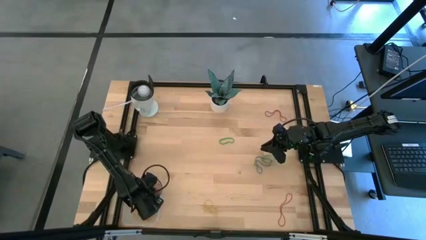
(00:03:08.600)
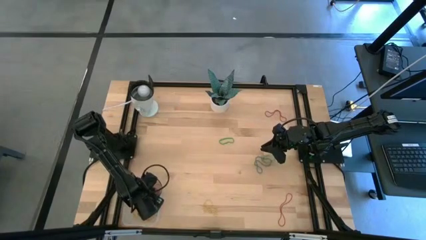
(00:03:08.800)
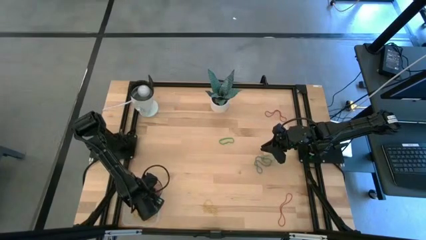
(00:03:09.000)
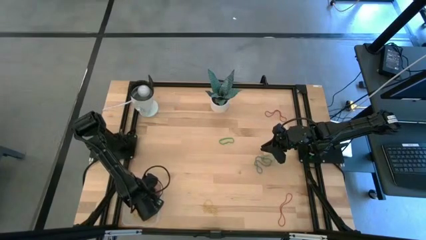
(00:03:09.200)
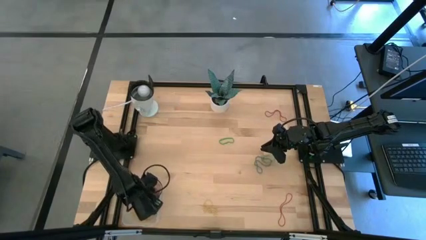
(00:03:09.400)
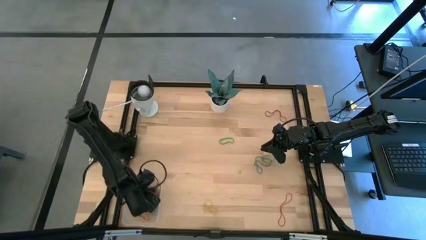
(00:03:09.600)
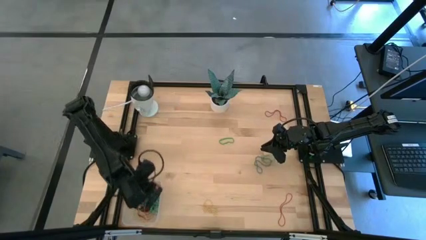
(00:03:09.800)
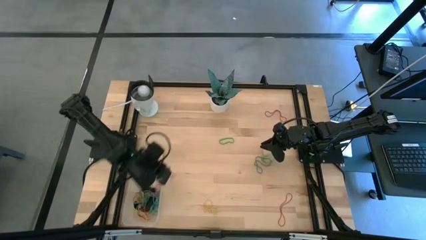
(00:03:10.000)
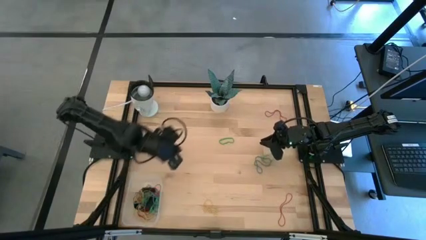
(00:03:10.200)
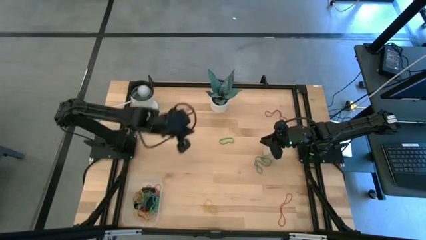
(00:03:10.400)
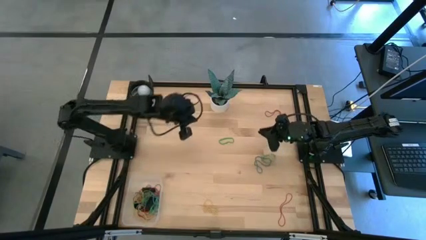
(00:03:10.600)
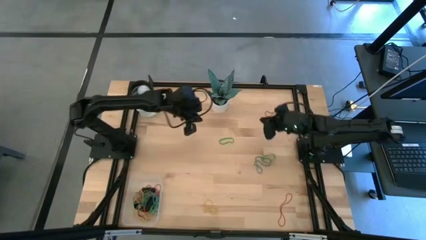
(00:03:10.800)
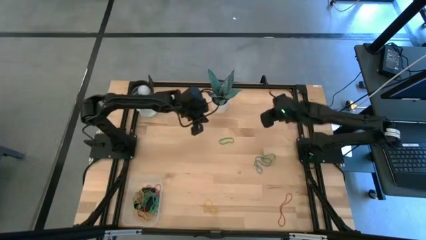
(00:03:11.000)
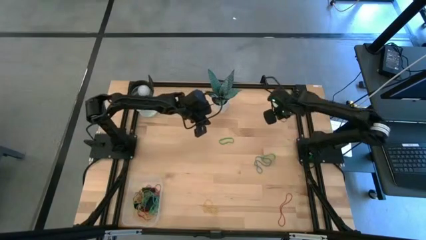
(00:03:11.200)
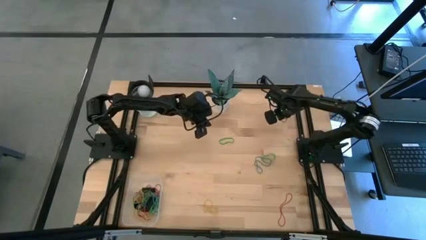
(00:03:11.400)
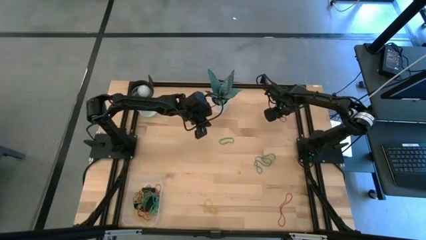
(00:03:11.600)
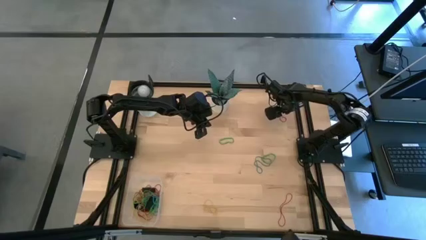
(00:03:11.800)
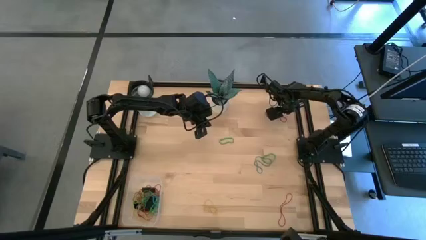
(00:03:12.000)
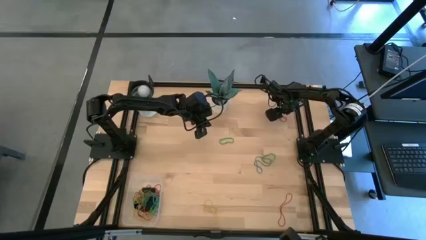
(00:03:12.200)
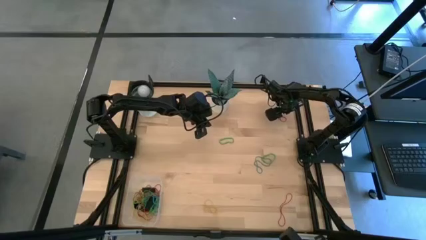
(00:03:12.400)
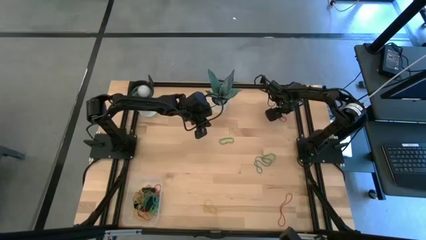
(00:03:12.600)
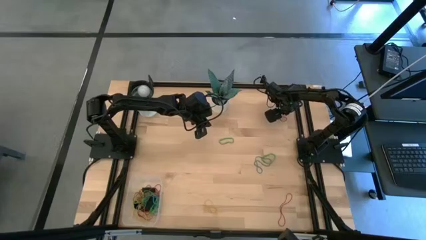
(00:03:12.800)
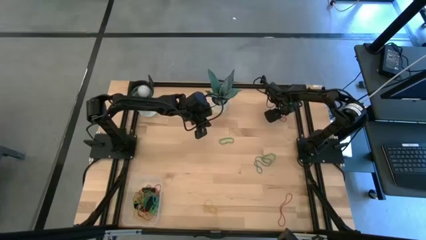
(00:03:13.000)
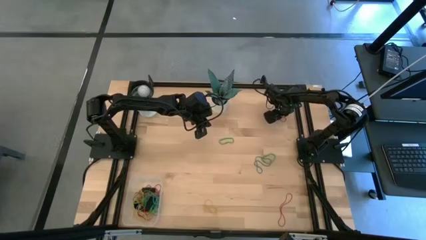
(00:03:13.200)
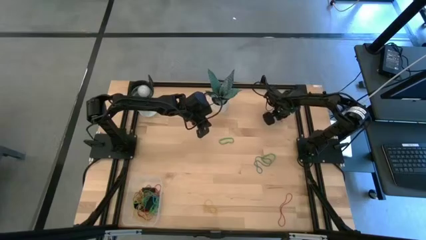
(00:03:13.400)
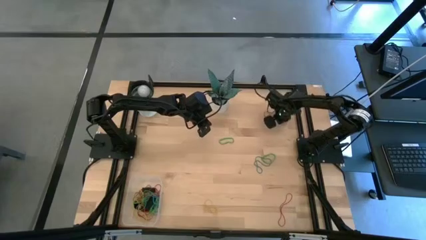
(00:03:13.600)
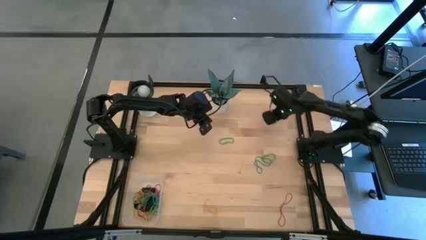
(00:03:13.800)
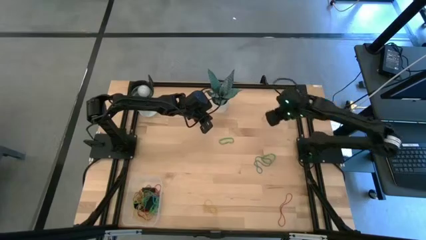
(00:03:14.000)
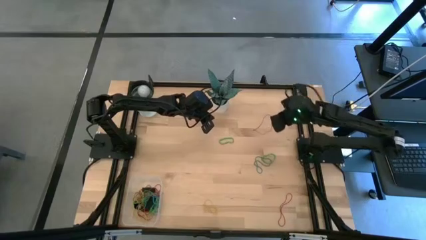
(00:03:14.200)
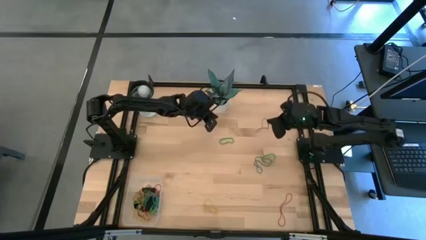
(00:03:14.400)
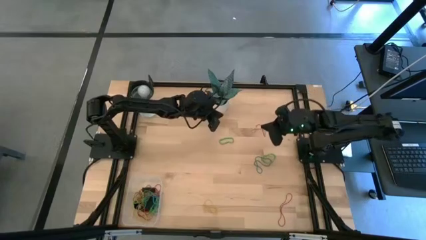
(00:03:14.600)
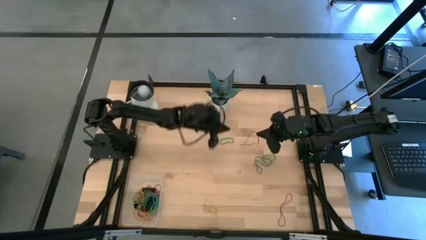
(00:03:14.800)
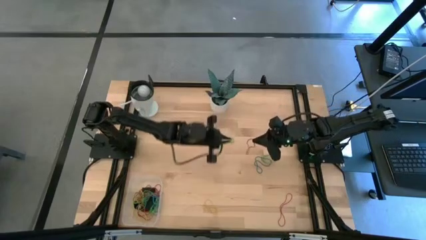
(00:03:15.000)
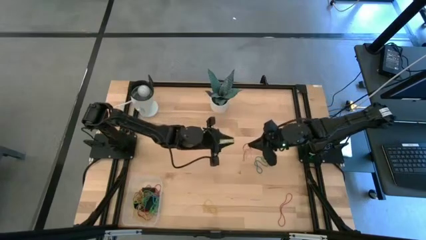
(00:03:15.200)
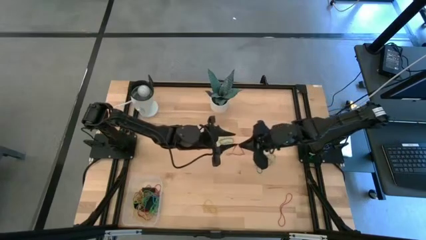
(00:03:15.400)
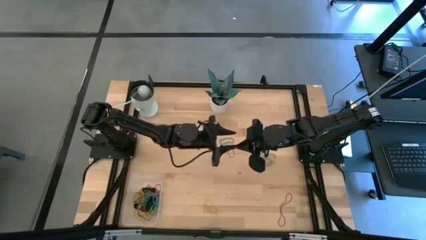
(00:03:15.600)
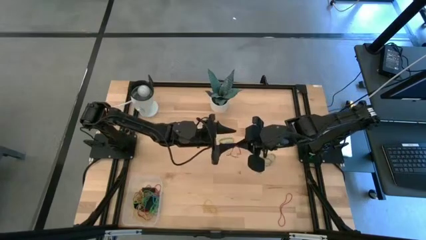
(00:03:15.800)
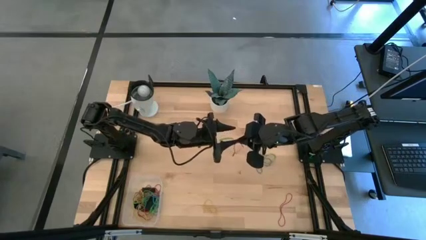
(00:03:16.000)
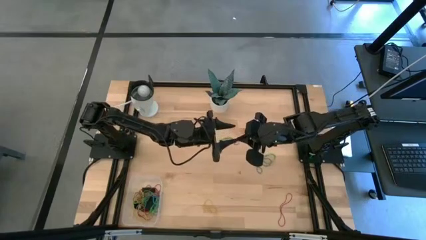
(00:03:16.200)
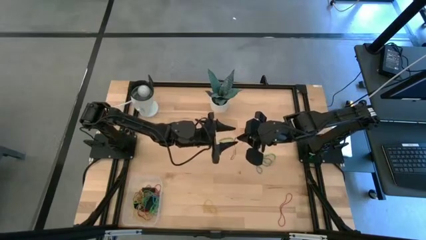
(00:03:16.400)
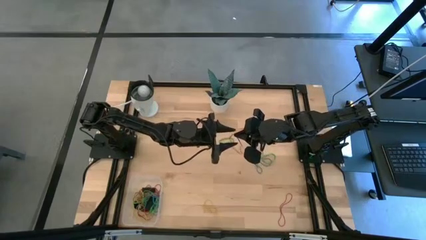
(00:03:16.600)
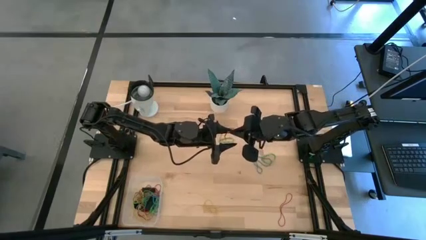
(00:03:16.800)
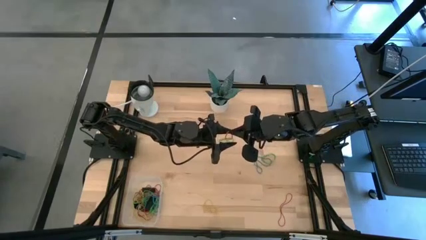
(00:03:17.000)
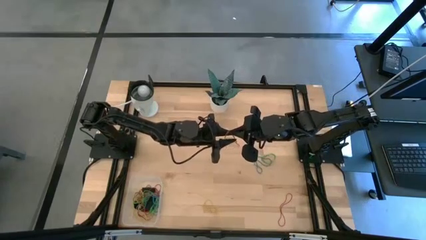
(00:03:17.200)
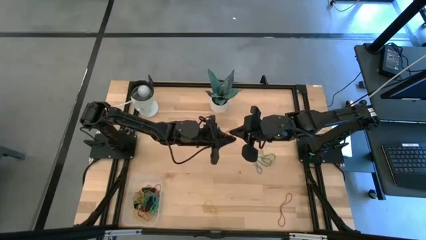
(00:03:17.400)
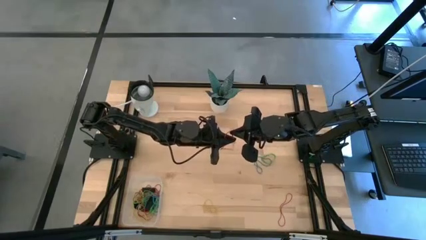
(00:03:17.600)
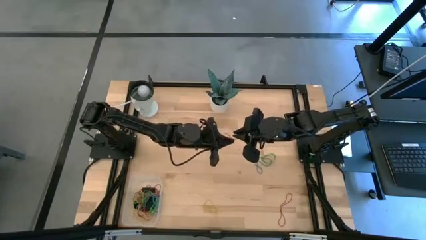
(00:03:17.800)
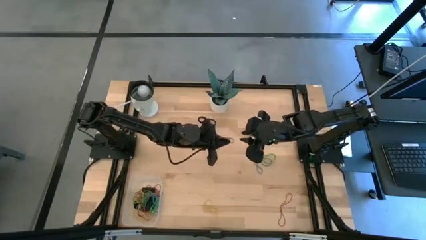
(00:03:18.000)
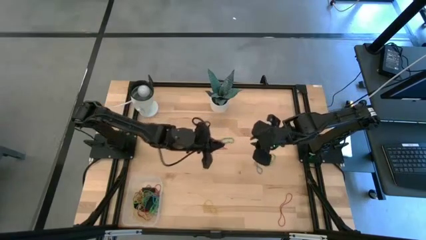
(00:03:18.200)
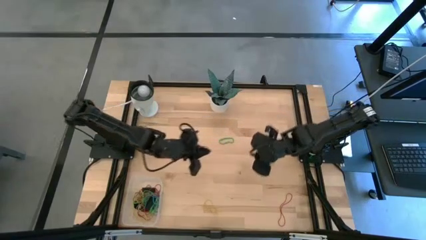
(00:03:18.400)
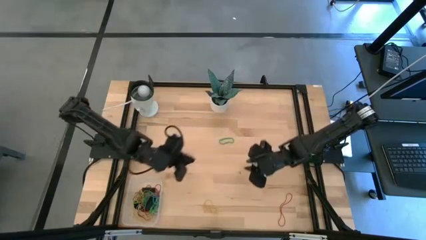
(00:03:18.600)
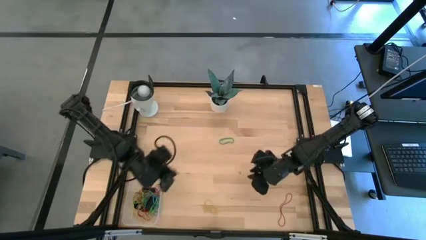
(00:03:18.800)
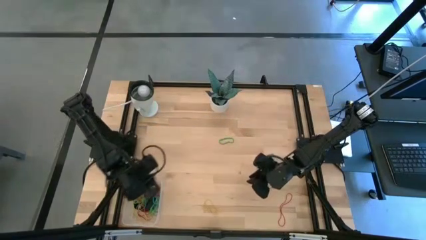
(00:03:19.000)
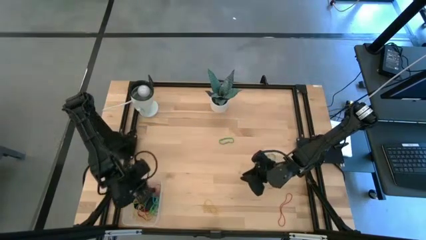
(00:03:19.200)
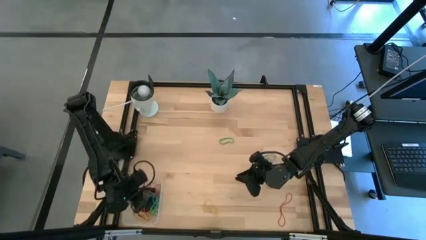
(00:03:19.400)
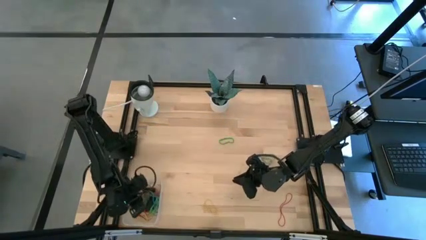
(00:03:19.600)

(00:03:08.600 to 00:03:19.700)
Task: Pick and place rubber bands into bin
Put the red rubber band into the transparent bin

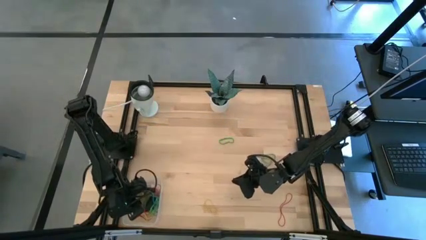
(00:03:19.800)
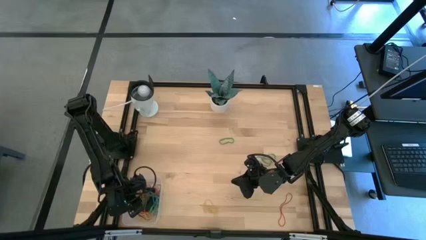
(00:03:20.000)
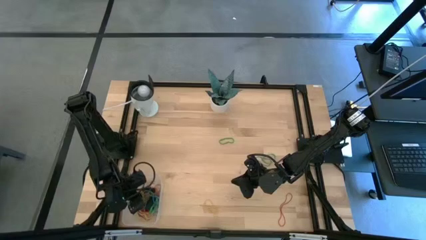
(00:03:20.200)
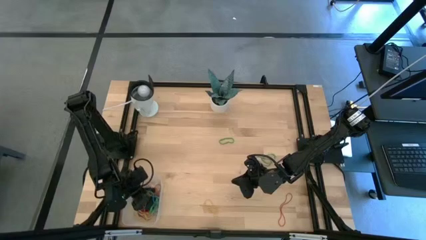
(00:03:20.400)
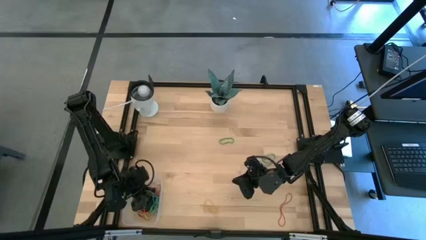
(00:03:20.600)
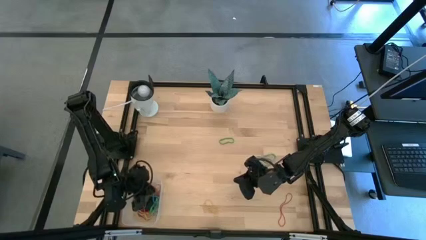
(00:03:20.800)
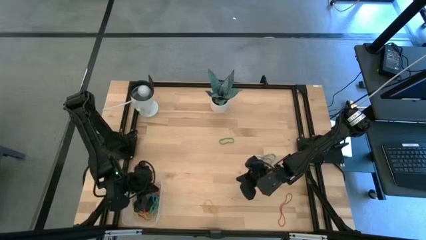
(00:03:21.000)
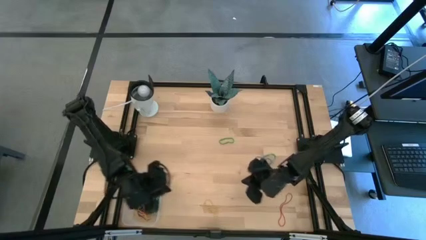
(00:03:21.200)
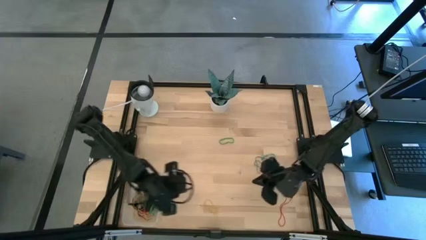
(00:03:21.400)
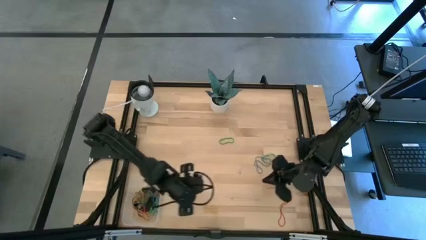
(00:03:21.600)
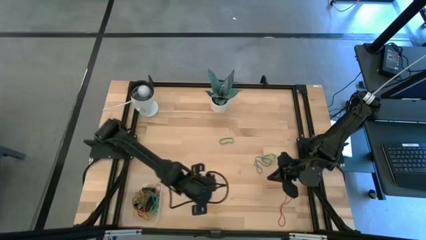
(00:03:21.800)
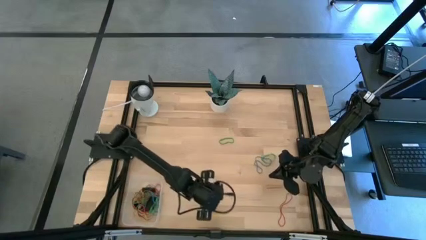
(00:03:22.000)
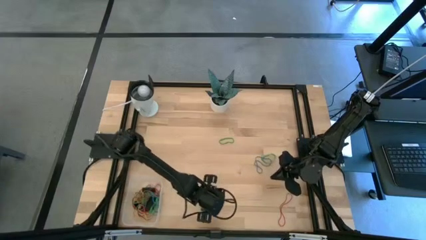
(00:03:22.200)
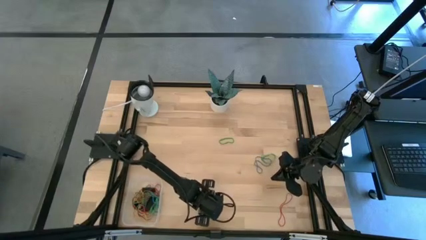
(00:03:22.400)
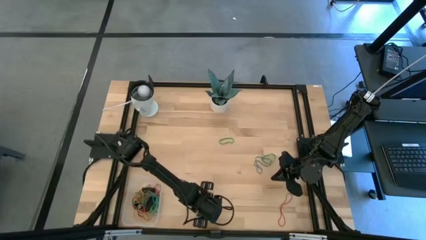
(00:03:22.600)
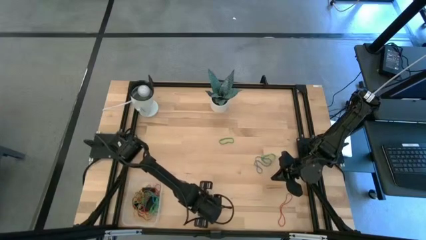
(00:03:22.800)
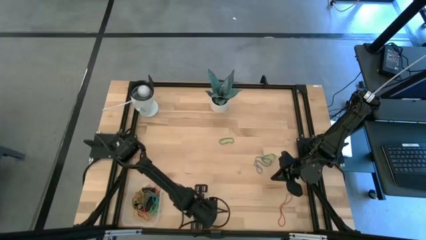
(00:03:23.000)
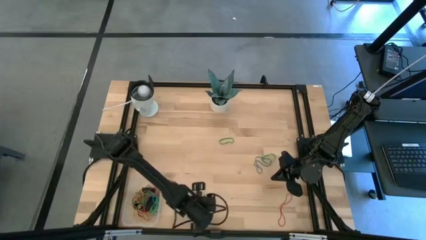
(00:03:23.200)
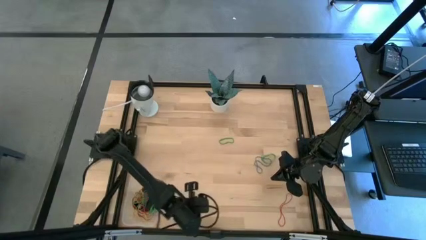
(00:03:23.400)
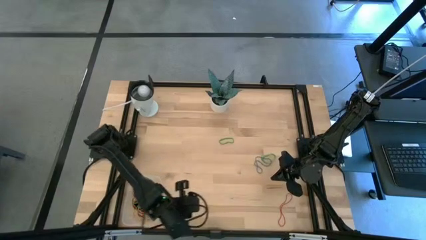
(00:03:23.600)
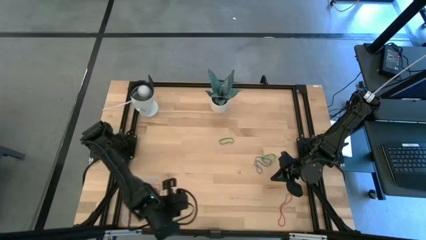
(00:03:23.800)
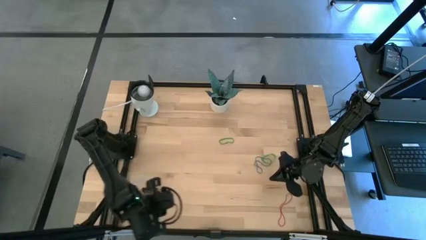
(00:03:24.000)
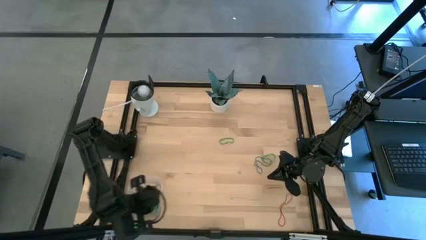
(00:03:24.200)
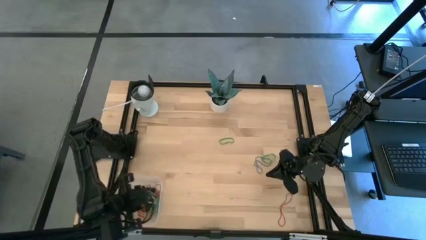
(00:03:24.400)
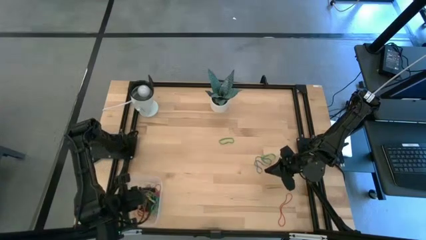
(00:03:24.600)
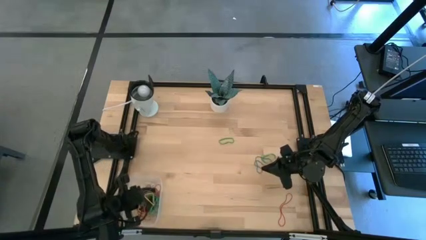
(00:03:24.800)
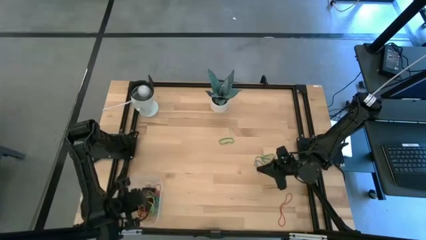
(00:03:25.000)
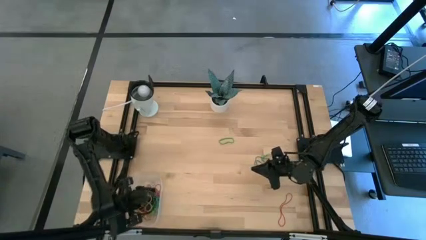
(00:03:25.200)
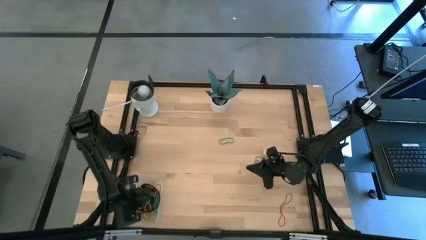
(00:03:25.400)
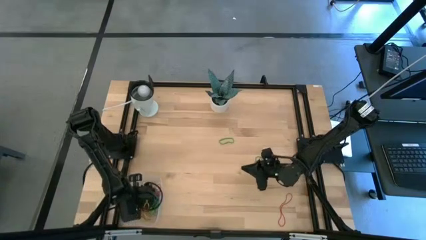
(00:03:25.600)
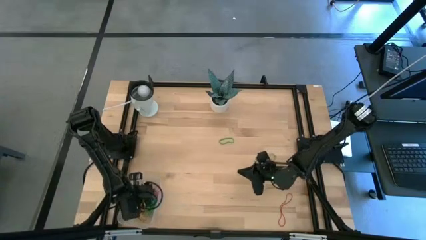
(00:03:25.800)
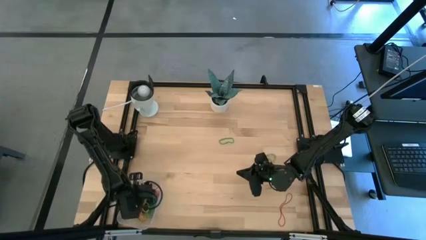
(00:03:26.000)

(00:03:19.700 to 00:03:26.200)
Put the yellow rubber band into the transparent bin
